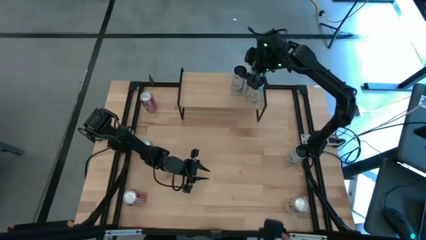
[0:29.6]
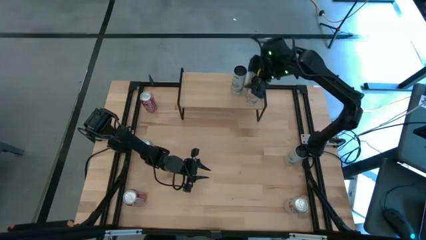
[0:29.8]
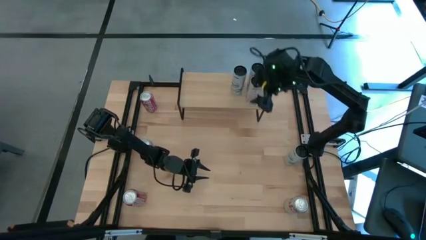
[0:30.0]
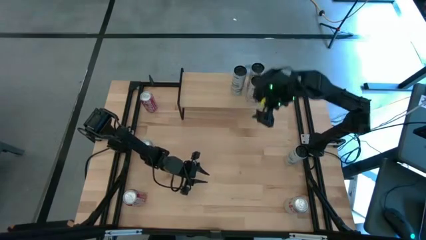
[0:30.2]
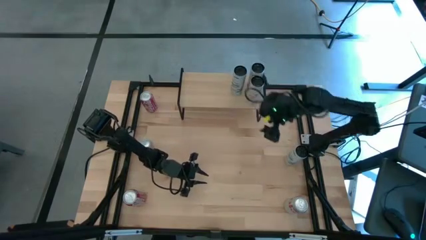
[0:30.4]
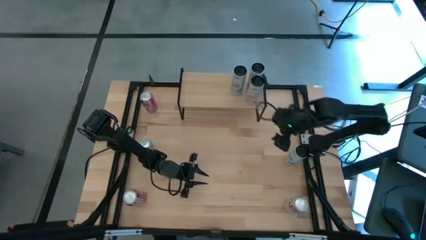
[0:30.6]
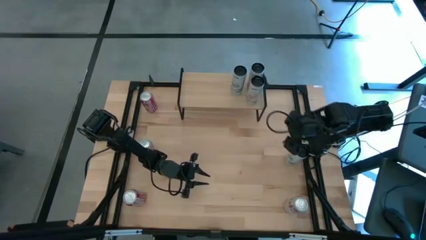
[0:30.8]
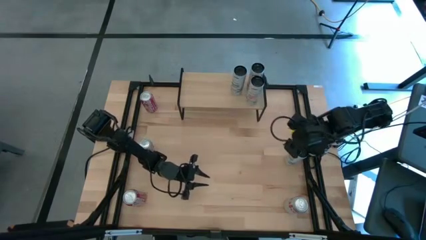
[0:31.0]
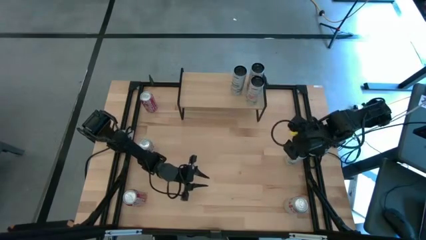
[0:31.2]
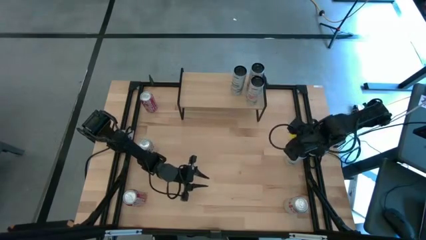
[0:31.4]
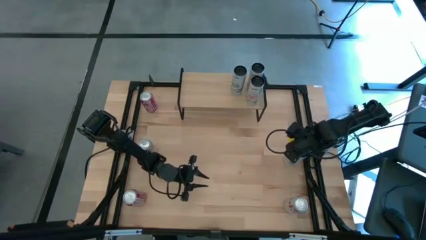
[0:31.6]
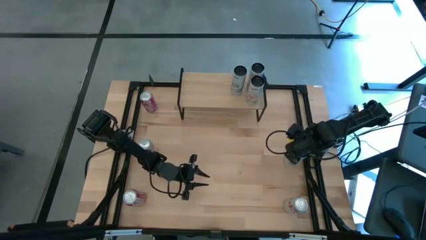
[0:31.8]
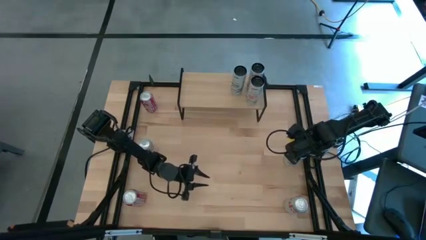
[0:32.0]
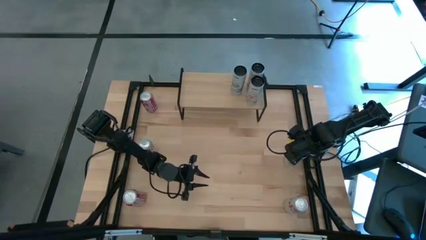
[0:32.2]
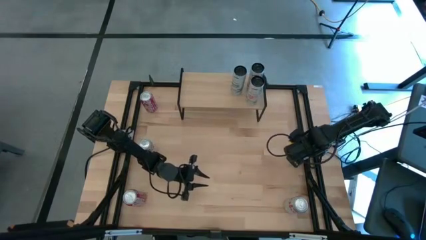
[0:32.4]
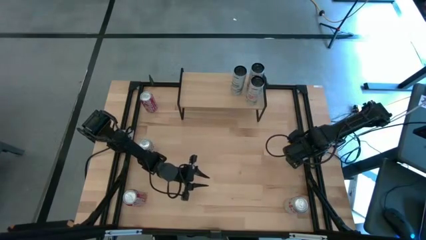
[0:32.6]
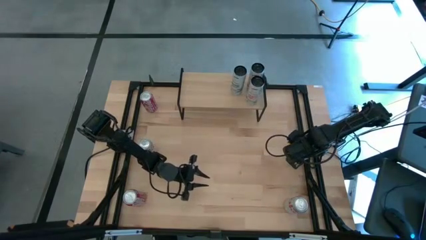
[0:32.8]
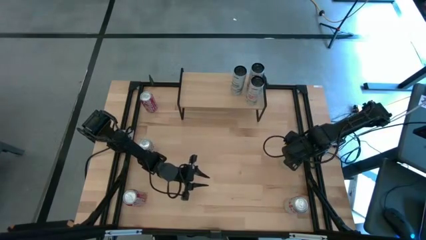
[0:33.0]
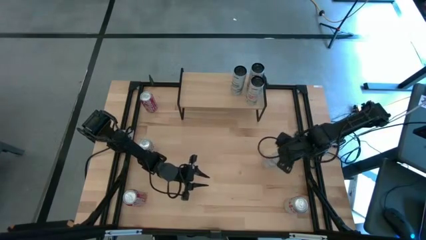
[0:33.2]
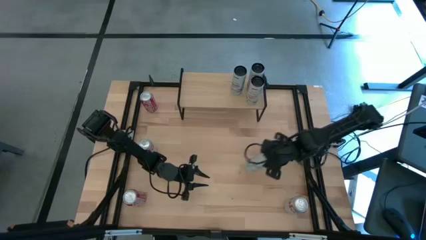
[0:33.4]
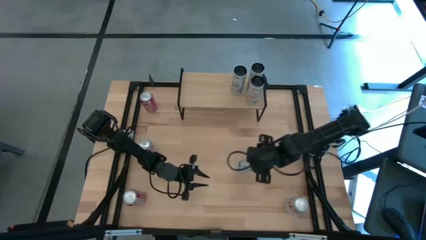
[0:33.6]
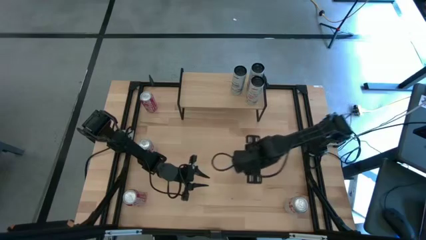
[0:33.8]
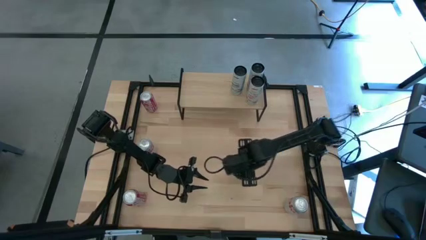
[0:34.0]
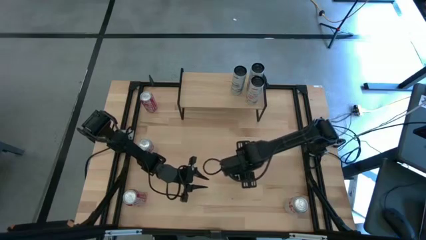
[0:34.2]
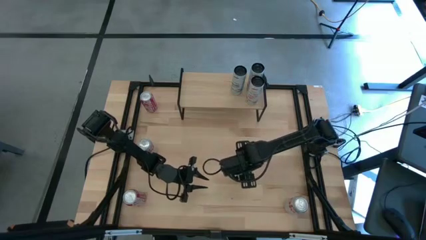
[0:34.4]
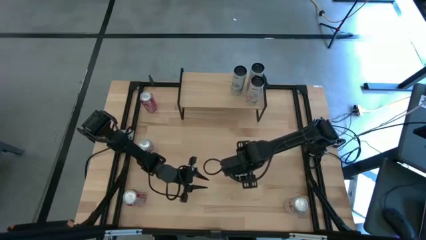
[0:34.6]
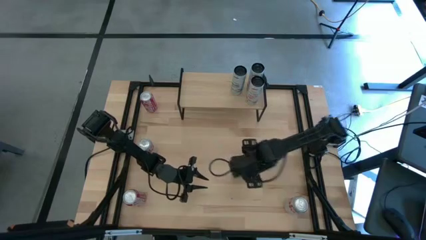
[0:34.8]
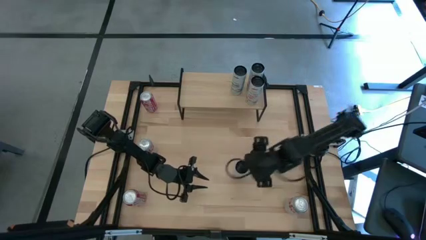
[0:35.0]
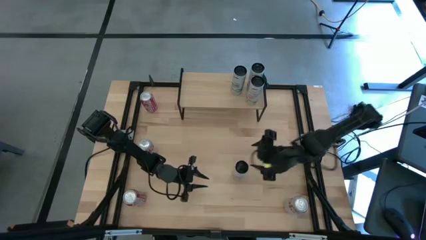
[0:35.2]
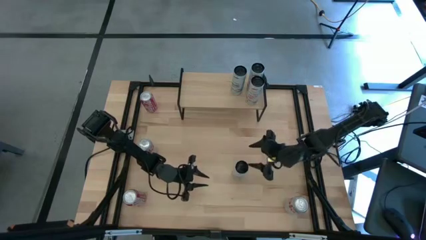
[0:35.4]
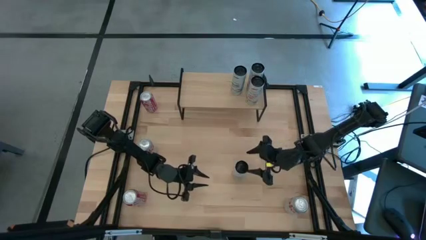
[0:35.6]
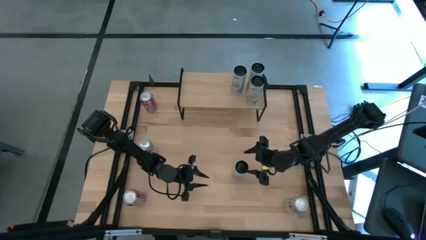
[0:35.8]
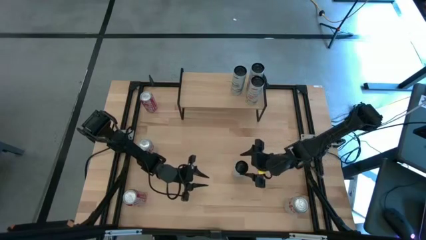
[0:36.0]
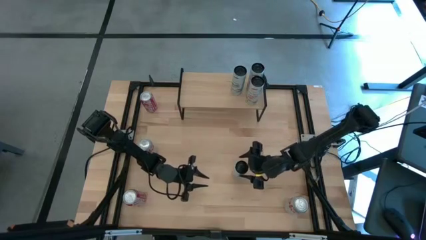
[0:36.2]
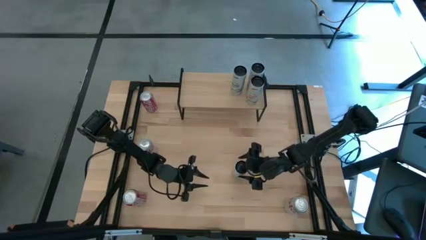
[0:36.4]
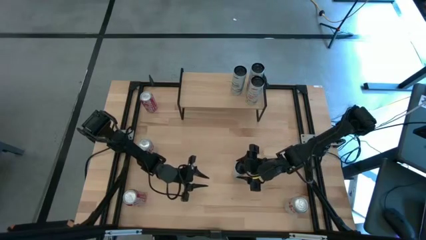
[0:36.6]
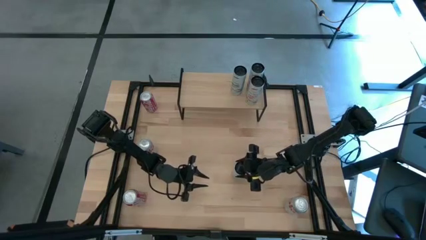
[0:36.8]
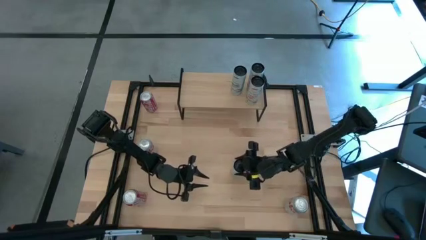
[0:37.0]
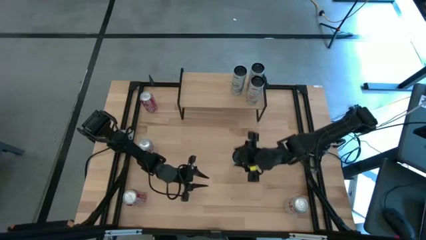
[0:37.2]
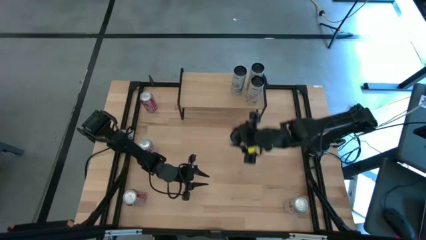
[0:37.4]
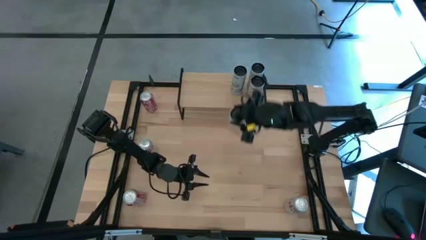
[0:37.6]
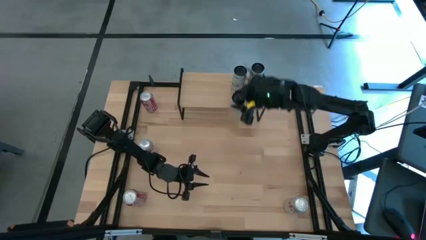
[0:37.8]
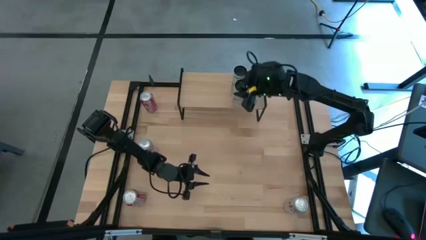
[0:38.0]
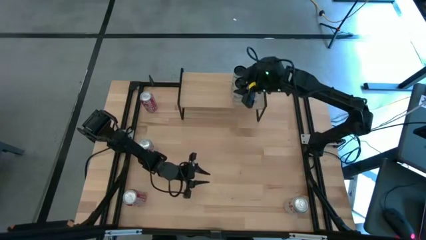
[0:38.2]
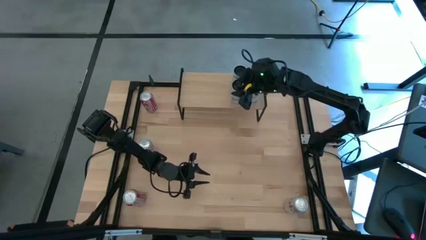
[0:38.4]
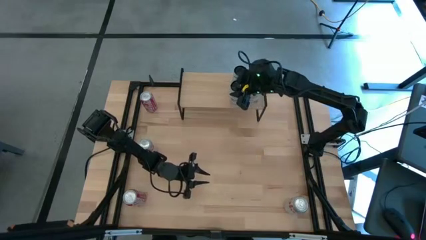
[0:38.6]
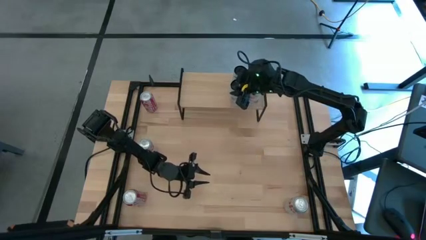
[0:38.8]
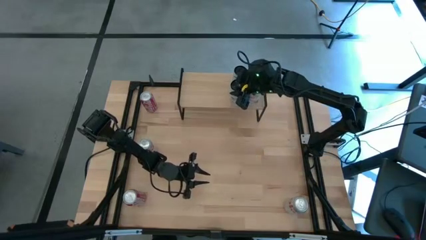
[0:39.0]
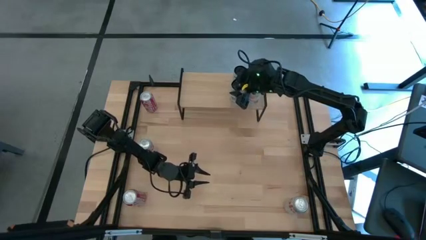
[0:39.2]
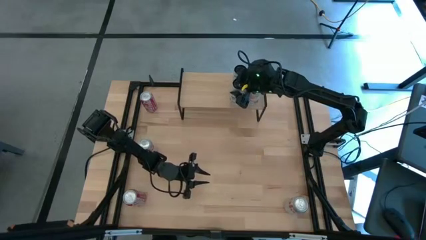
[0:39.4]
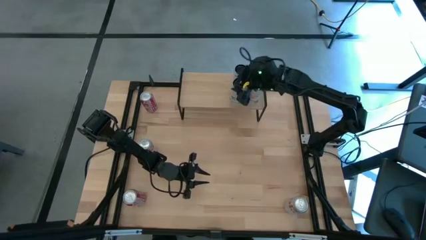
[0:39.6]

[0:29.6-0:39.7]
Task: Place canned beverage on shelf
Put the white blue soda can on the shelf aligned with the other white blue soda can

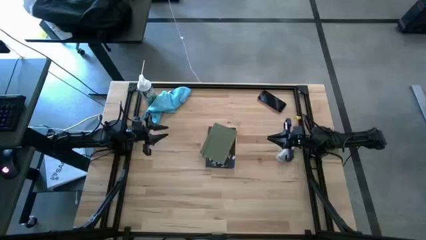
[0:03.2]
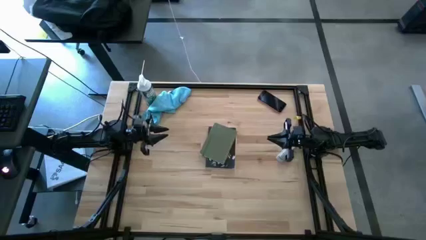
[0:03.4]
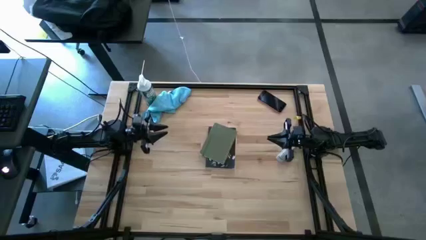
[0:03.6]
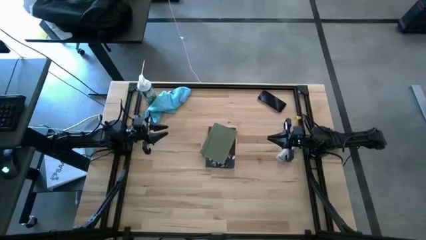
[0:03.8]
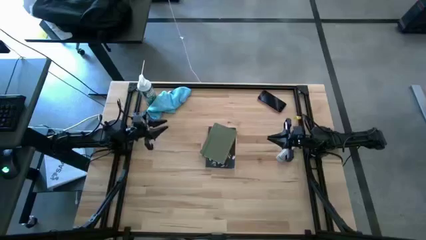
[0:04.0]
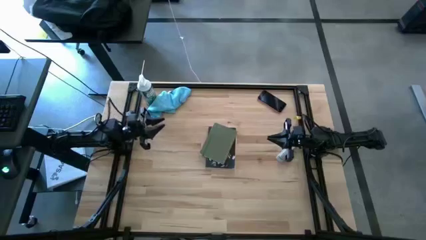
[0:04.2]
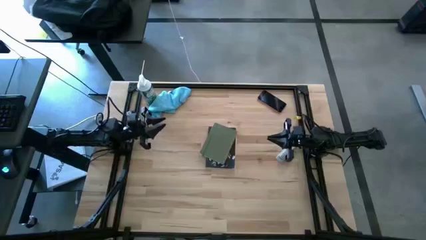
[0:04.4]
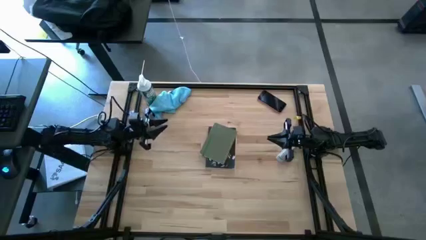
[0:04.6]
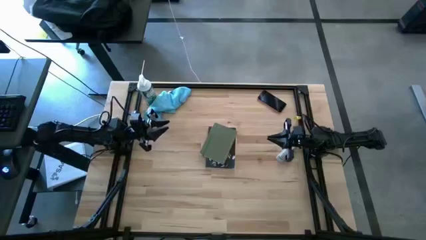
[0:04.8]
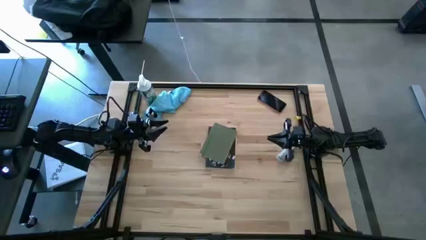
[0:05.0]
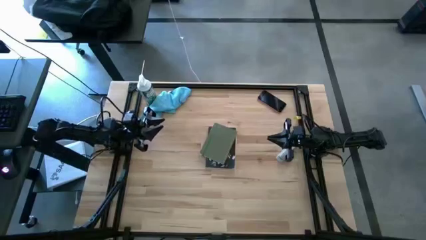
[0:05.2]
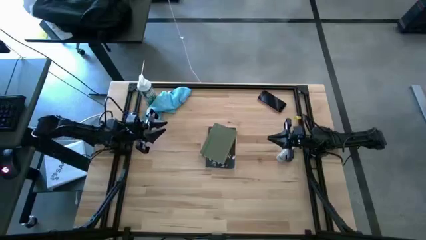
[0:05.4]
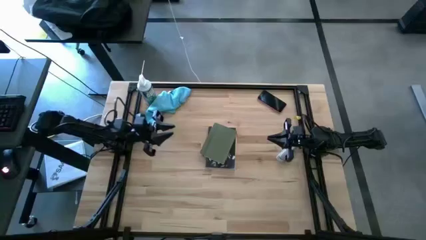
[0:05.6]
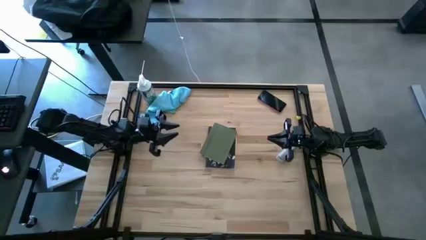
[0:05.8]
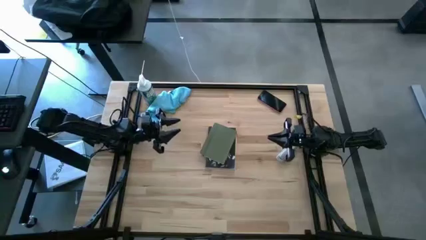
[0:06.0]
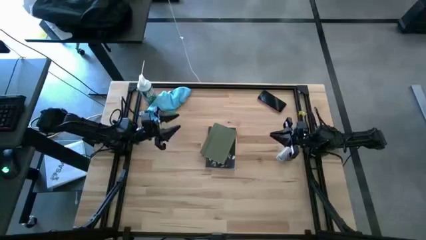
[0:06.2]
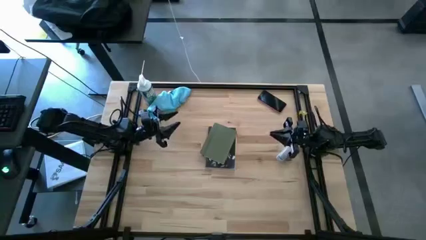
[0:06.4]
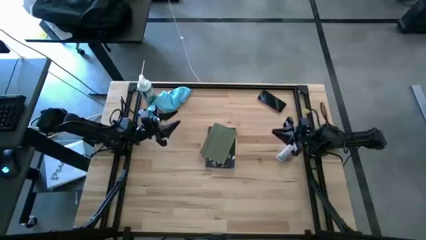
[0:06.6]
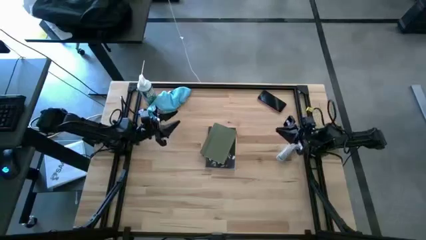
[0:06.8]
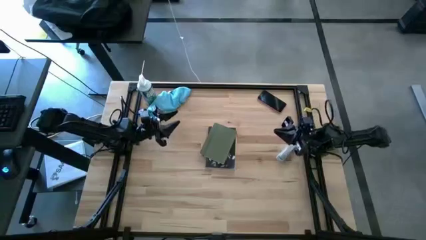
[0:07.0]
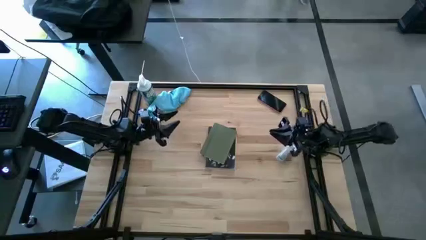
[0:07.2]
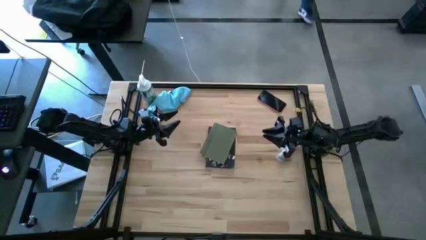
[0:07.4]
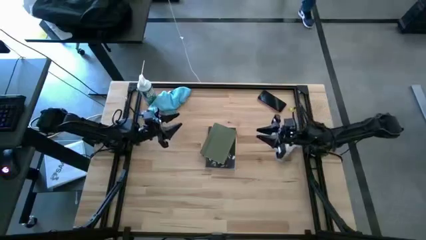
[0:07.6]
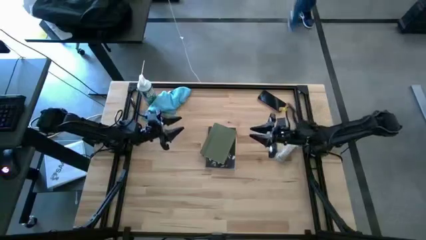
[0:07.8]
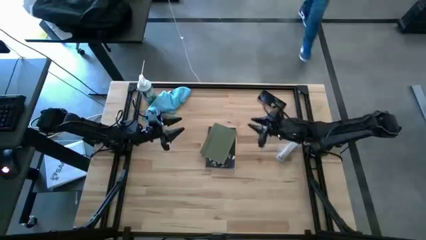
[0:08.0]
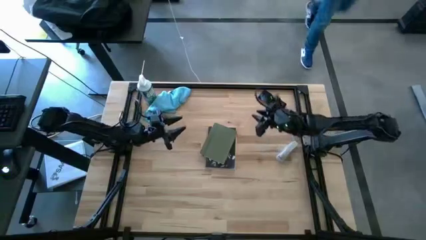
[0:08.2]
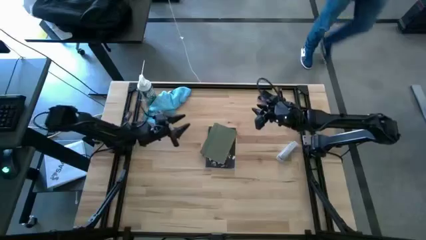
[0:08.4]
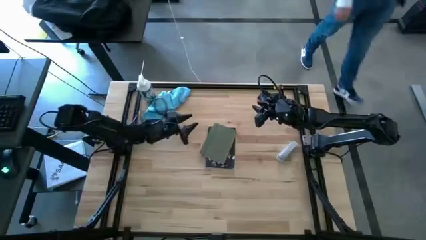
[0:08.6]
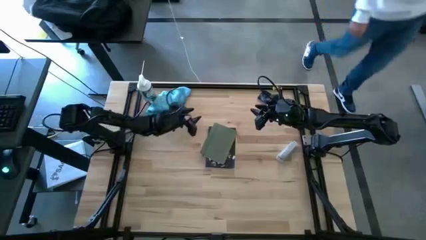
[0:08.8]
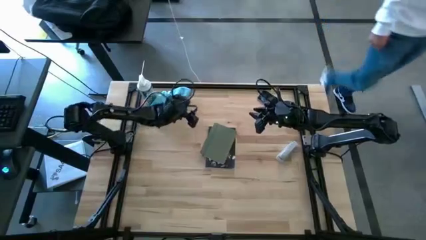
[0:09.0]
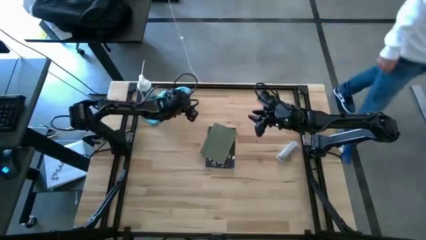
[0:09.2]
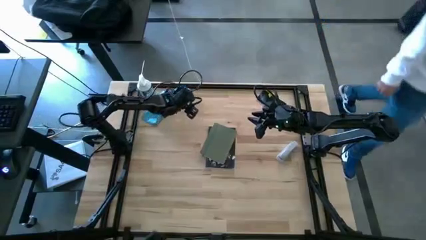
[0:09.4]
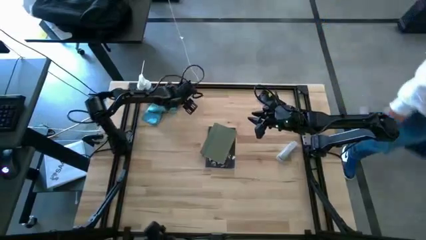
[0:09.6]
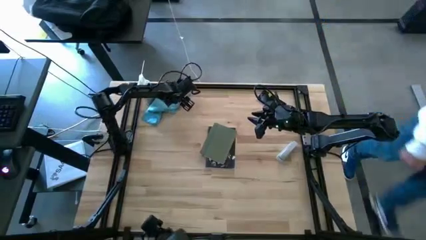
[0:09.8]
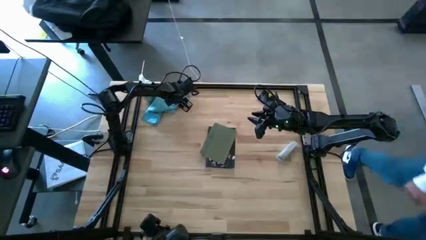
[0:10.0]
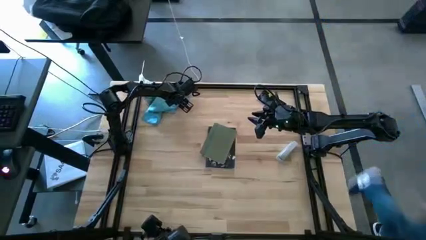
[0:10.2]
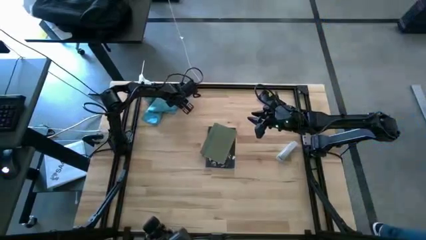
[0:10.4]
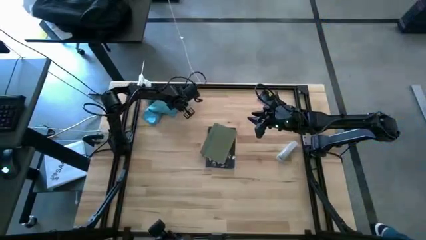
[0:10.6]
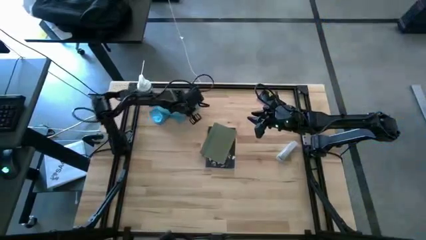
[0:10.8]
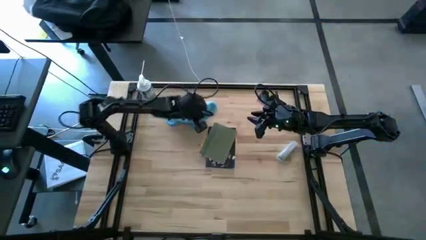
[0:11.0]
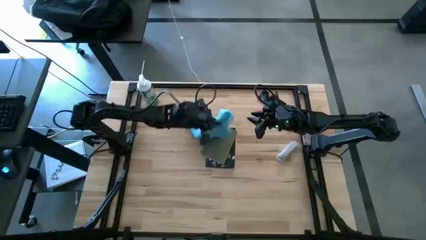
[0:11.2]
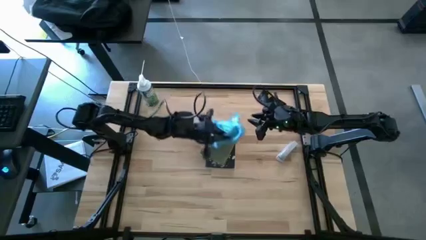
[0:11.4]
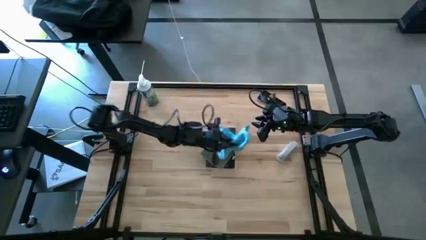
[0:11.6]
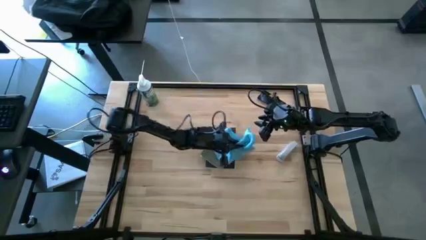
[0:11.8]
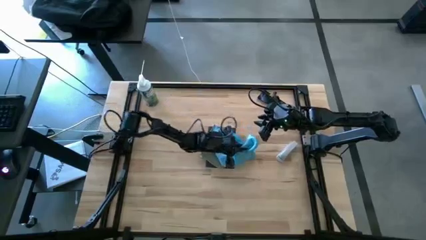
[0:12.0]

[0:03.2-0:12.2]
Task: Apply microfiber cloth
Move the blue microfiber towel from the top left to the center
